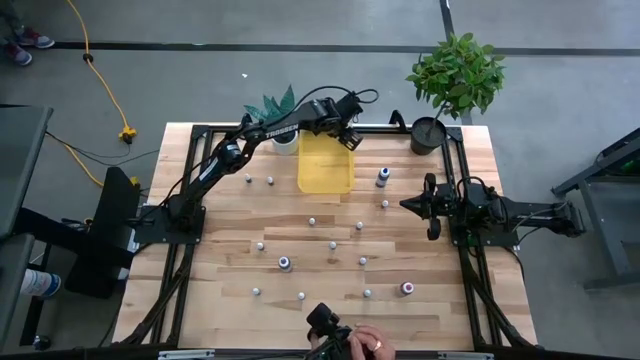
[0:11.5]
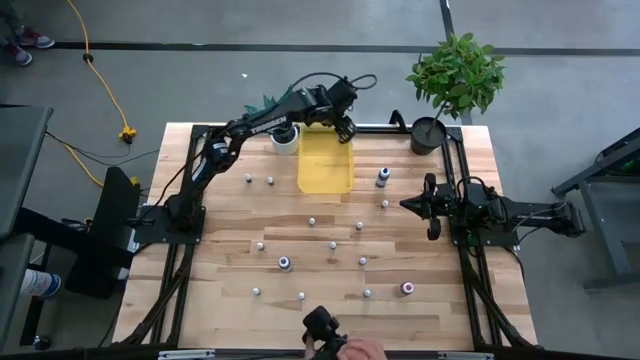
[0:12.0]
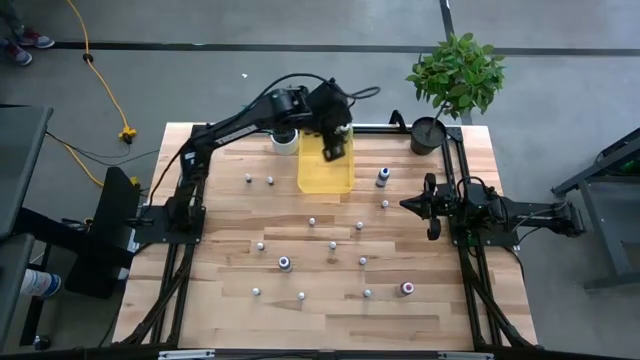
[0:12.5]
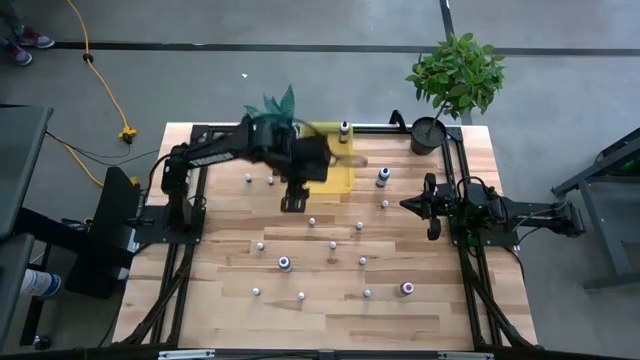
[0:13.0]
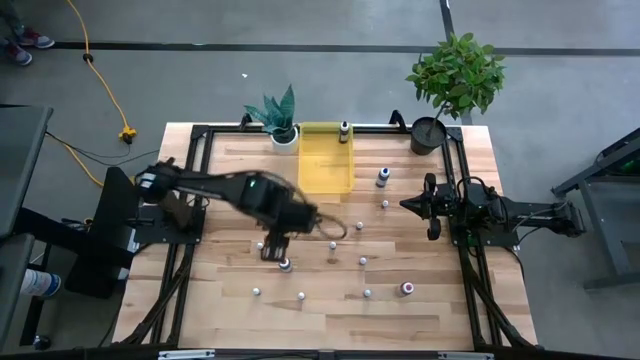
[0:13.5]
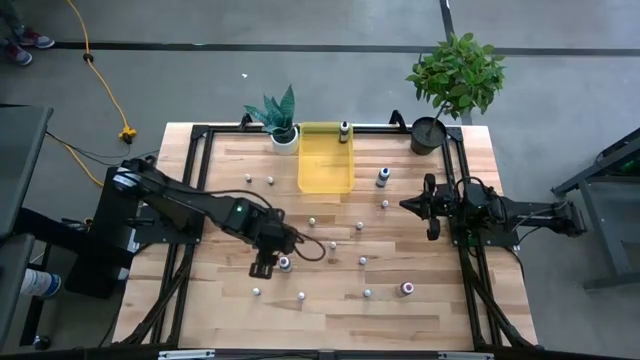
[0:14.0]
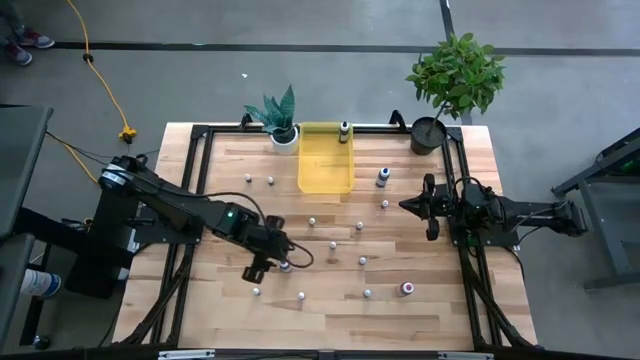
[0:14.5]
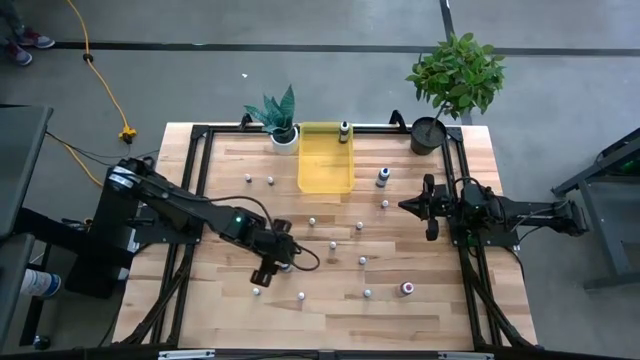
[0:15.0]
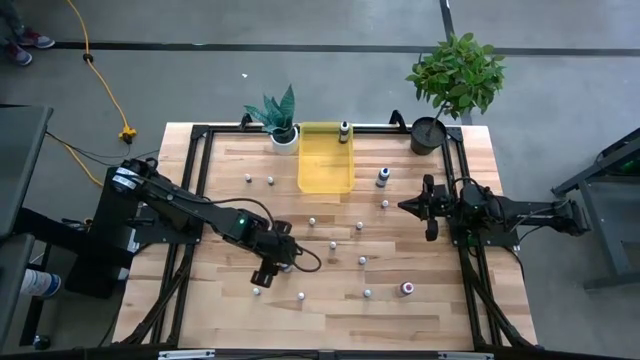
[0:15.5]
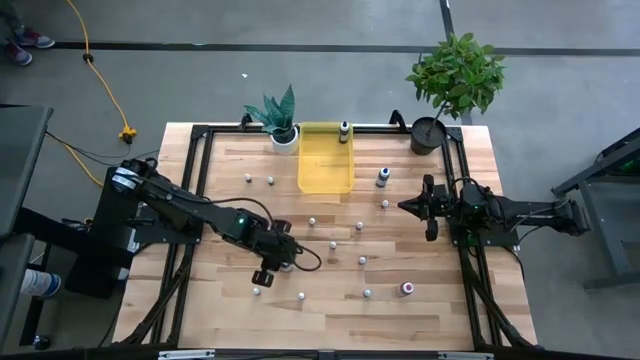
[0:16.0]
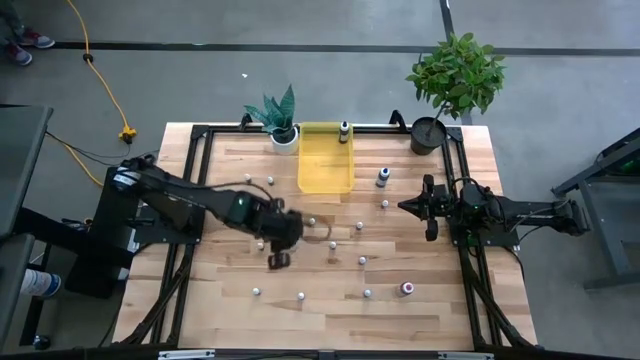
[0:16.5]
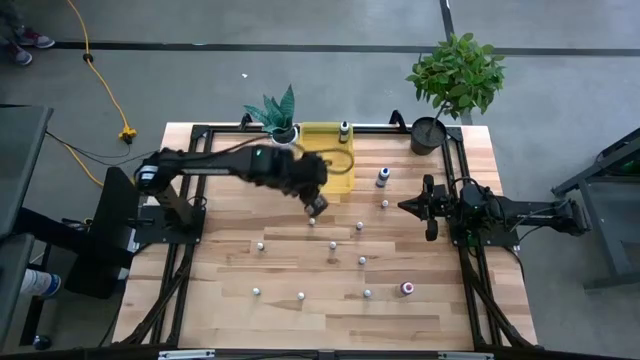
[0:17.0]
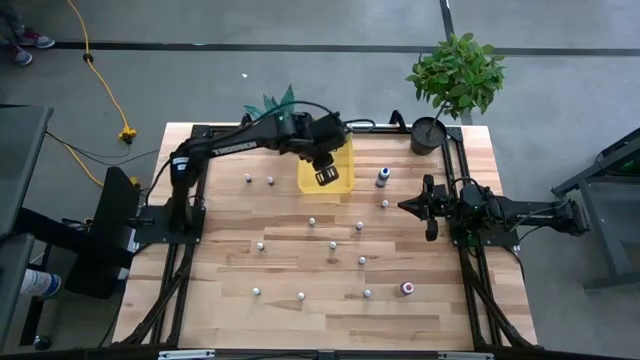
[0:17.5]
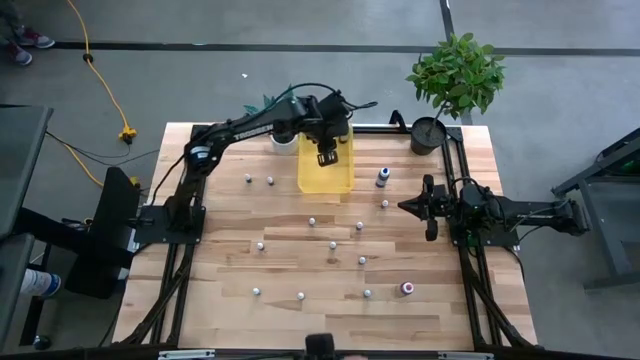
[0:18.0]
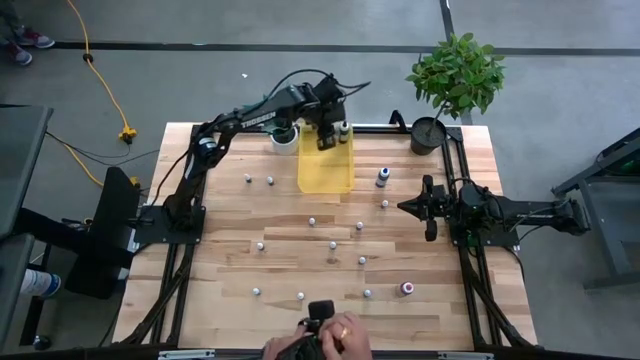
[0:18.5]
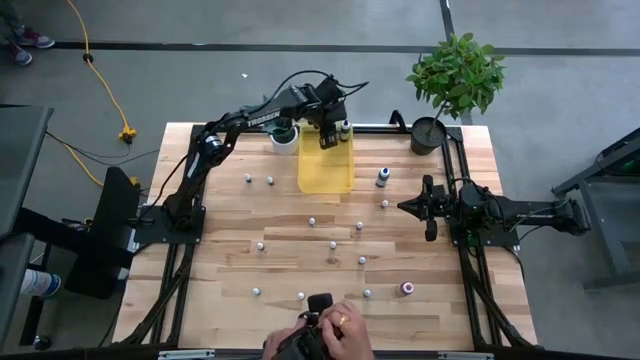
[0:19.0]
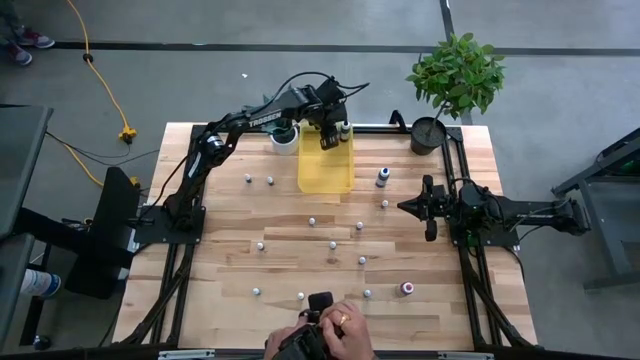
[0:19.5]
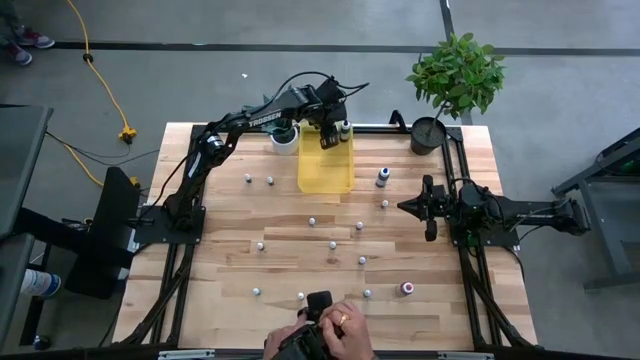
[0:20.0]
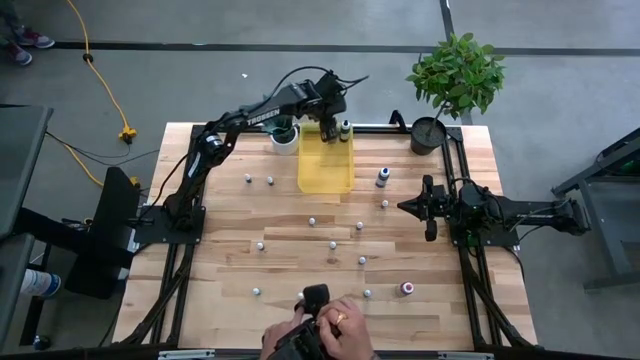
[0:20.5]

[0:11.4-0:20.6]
Task: Pick & Place food coloring
Put the large purple food coloring bottle into the yellow bin

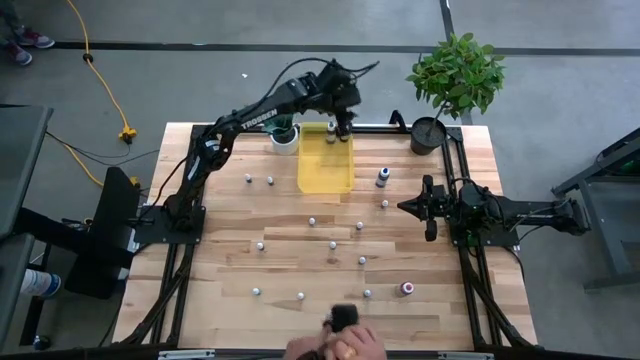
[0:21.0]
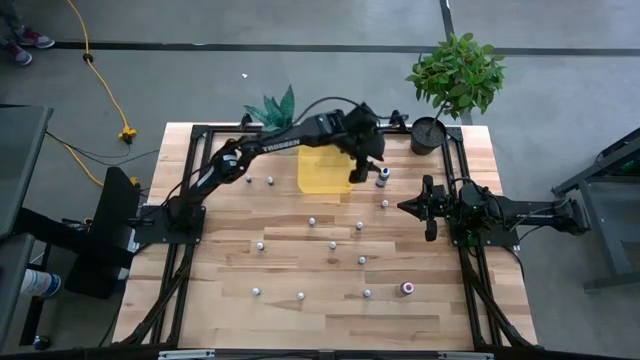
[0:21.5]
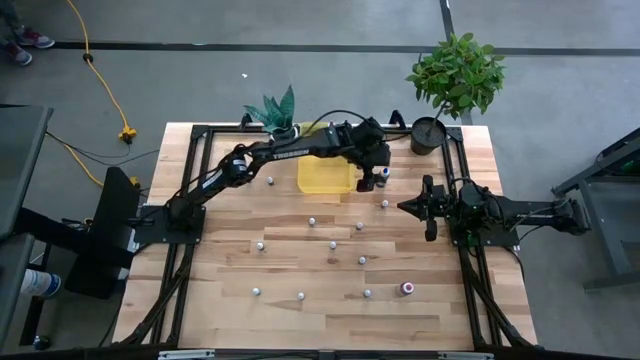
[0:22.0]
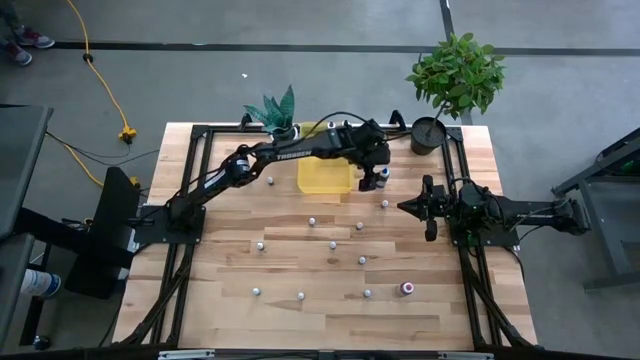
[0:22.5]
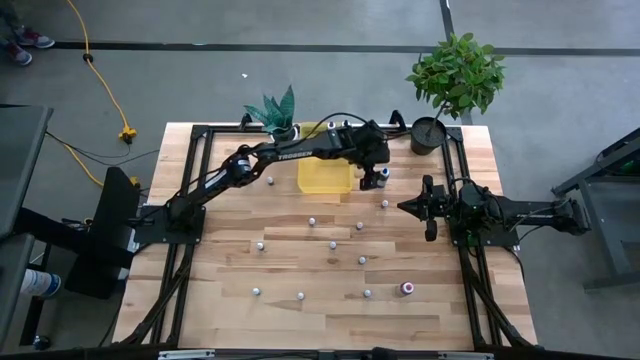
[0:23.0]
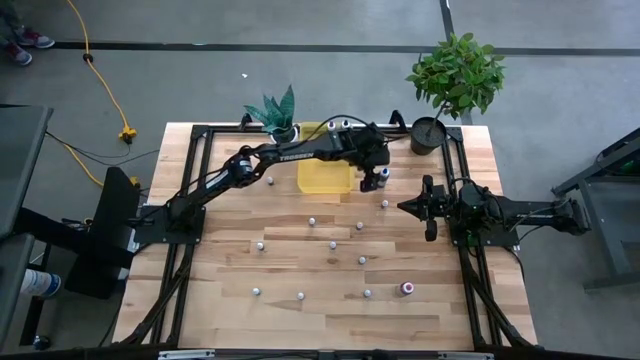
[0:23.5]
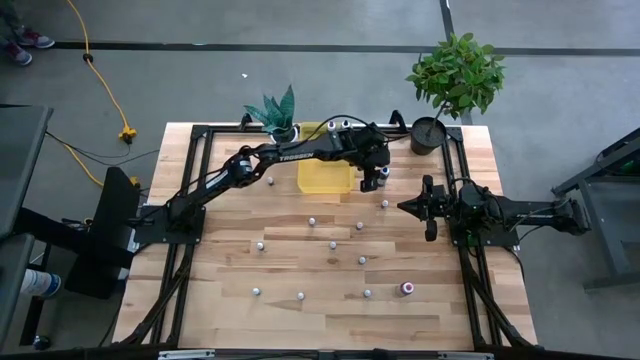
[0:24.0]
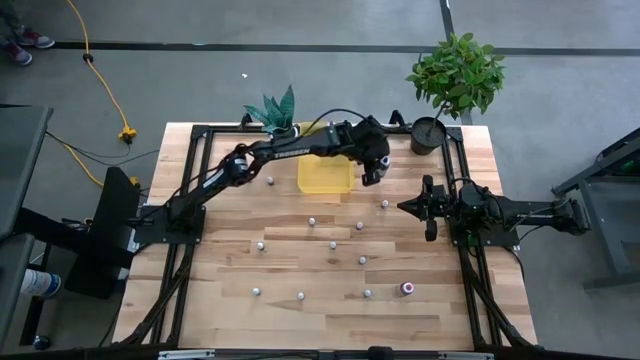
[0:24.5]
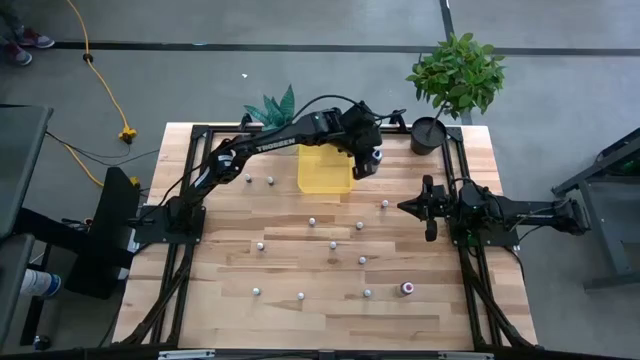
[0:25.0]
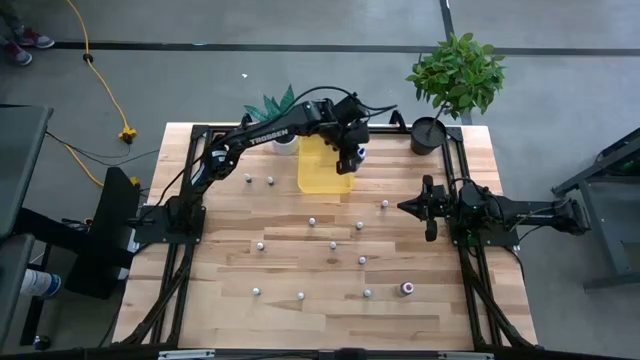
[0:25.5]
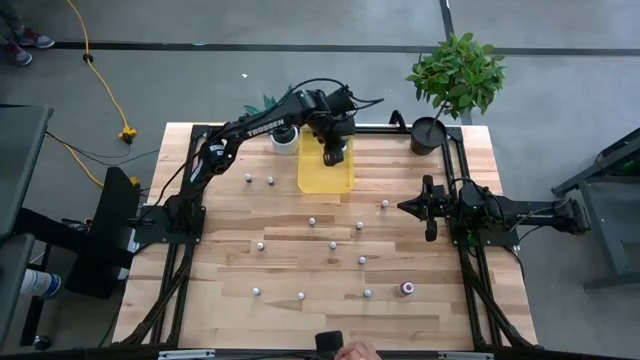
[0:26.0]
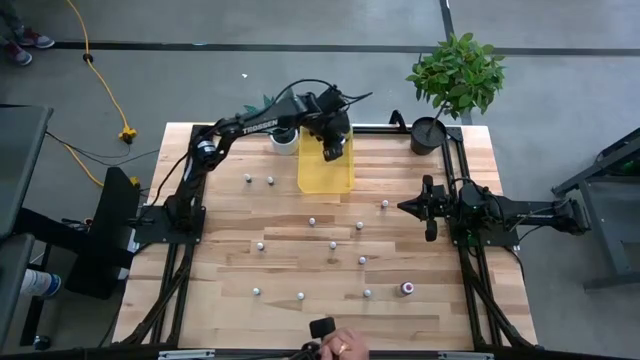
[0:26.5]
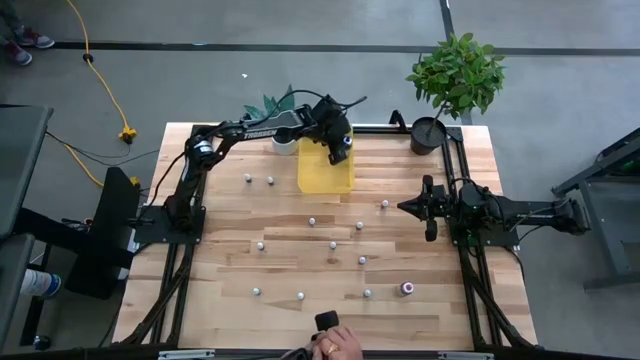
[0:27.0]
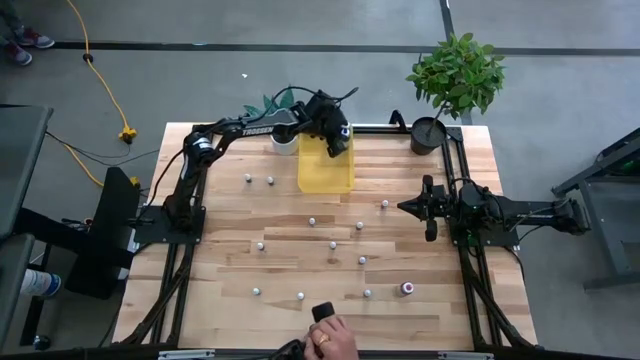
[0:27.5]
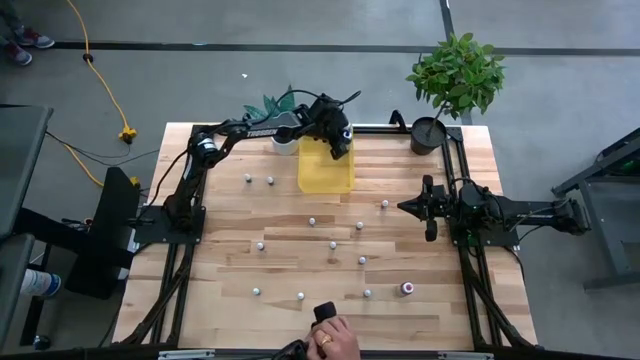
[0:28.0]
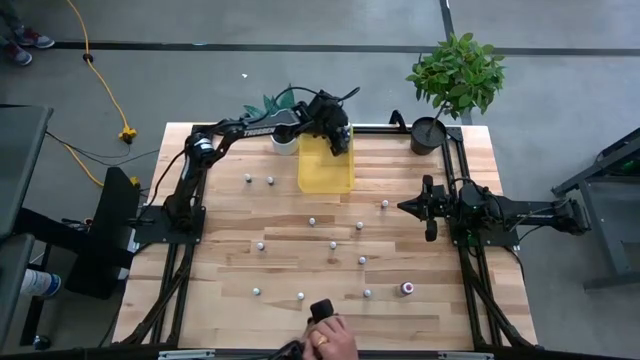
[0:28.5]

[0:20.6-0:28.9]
Put the large blue food coloring bottle into the yellow bin

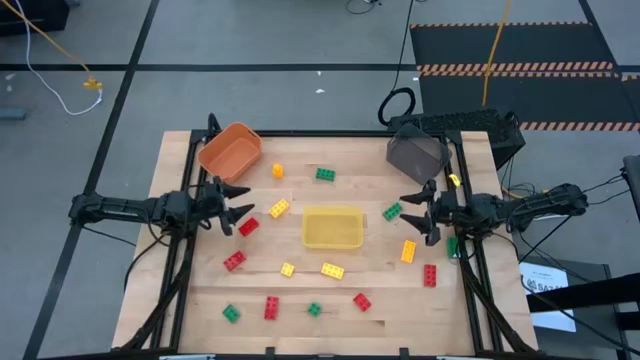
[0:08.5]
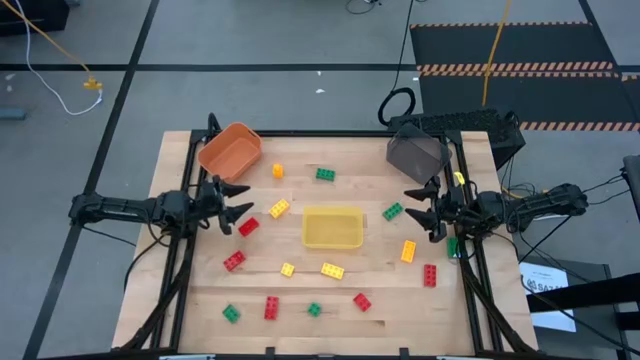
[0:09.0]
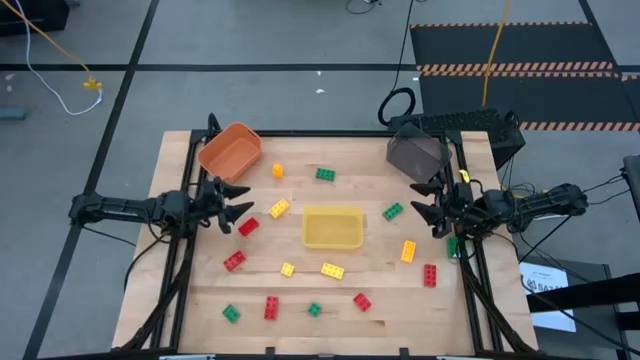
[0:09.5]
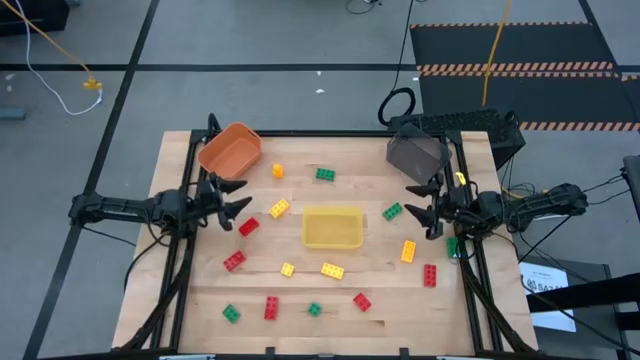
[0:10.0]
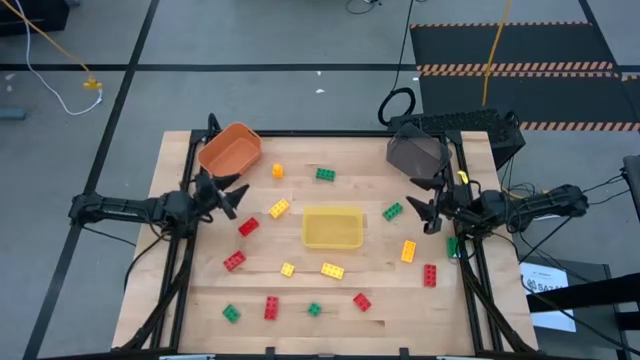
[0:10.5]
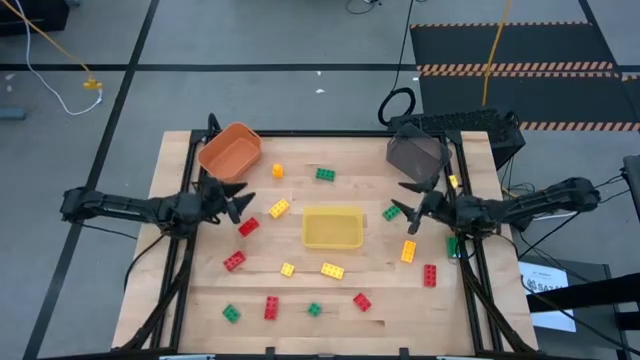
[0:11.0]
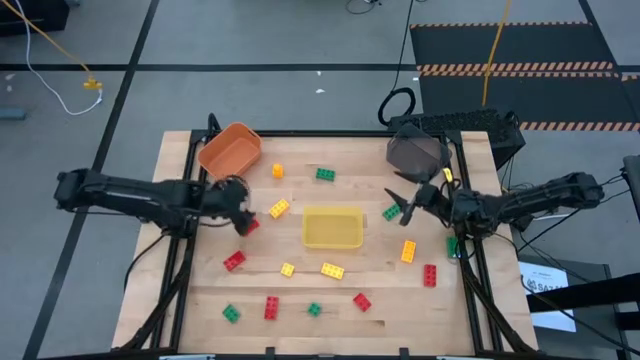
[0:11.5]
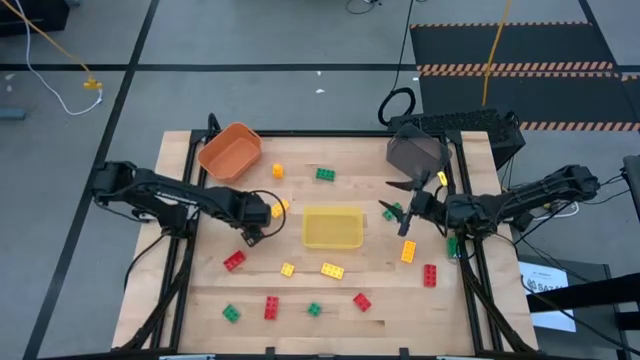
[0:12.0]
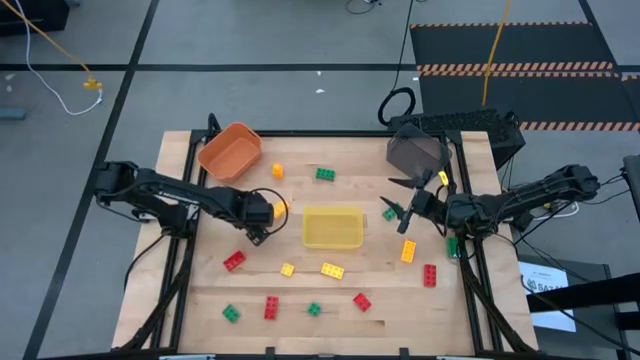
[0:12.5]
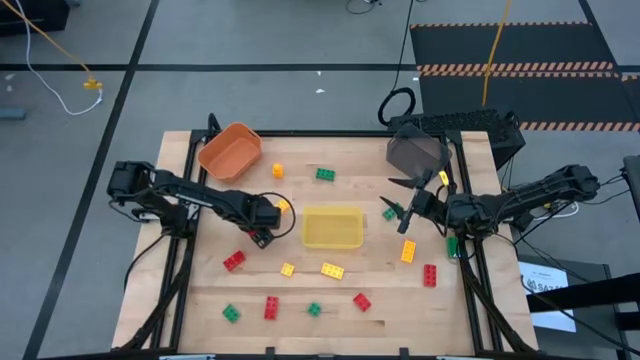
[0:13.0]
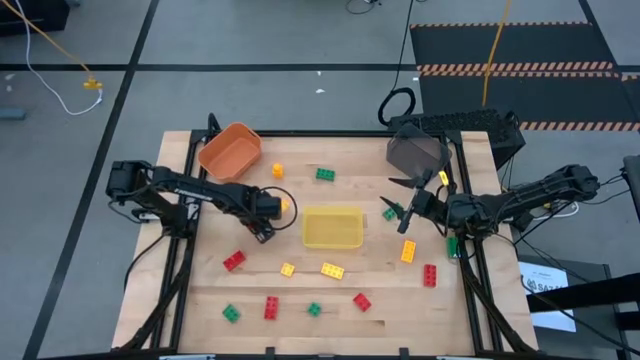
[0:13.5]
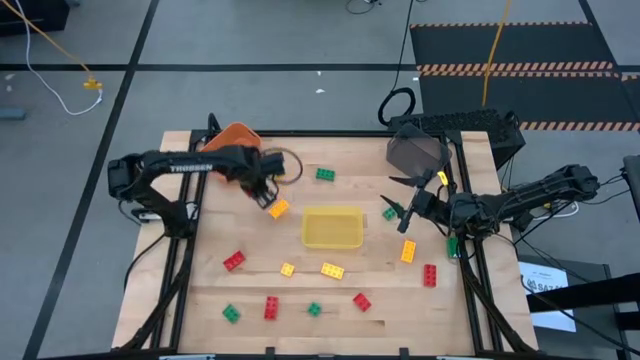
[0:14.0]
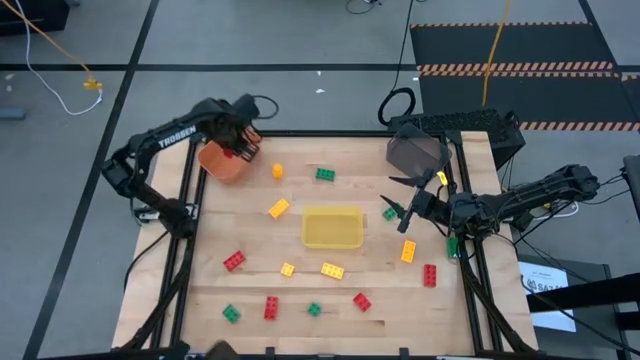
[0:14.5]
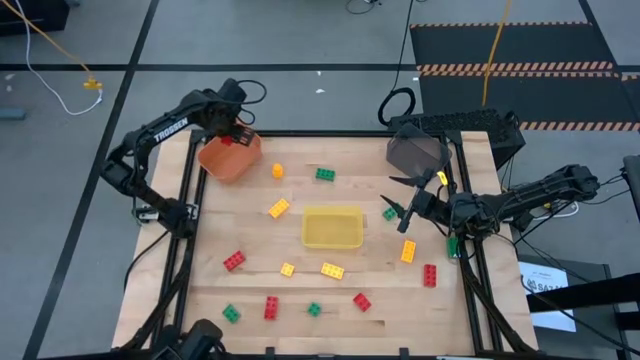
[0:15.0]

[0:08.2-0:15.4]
Task: Sort & place blocks by color
Put the top left red 8-stud game piece into the orange bin
